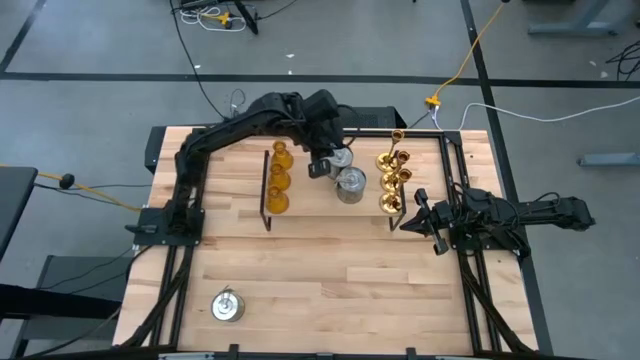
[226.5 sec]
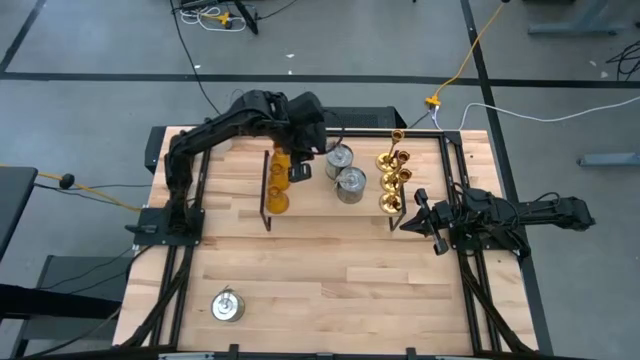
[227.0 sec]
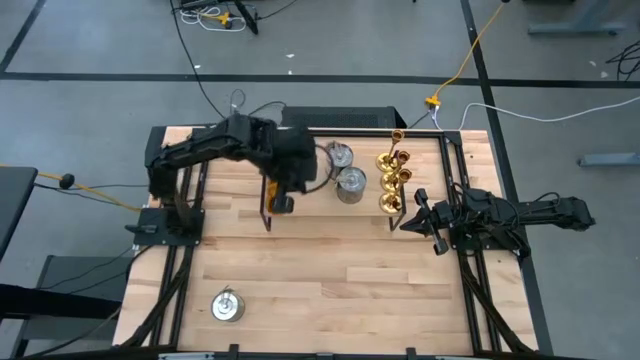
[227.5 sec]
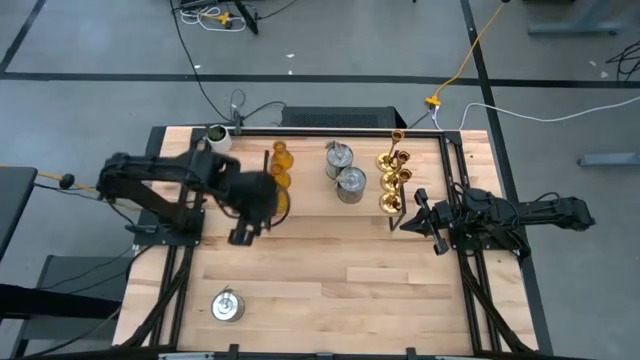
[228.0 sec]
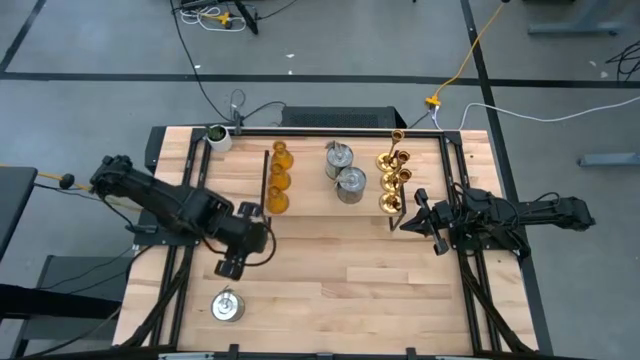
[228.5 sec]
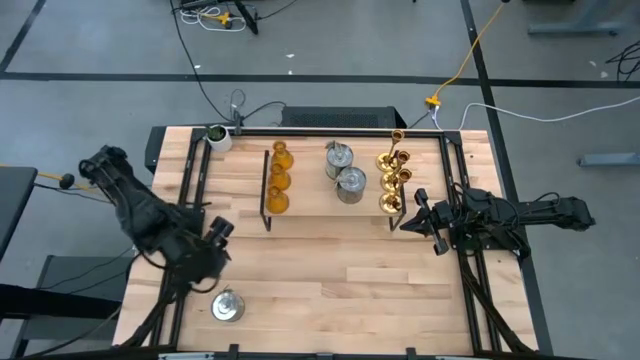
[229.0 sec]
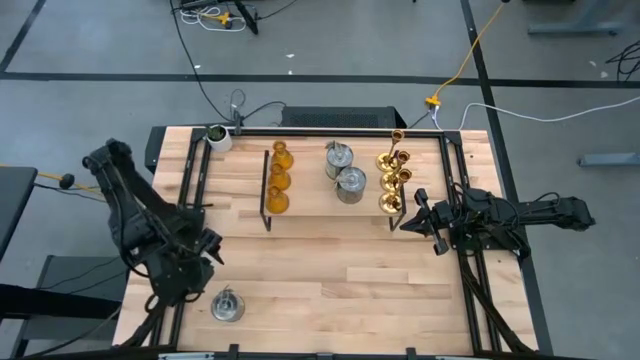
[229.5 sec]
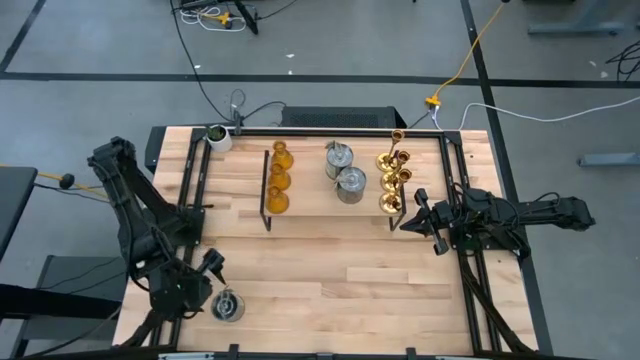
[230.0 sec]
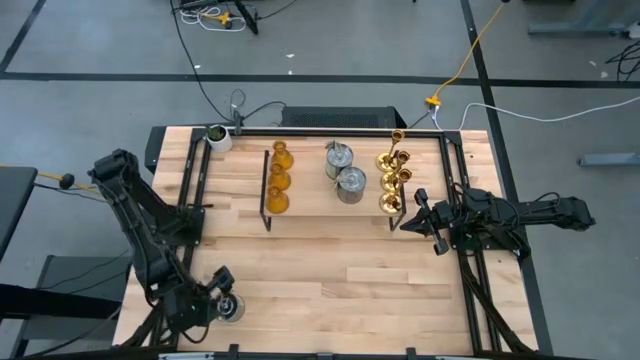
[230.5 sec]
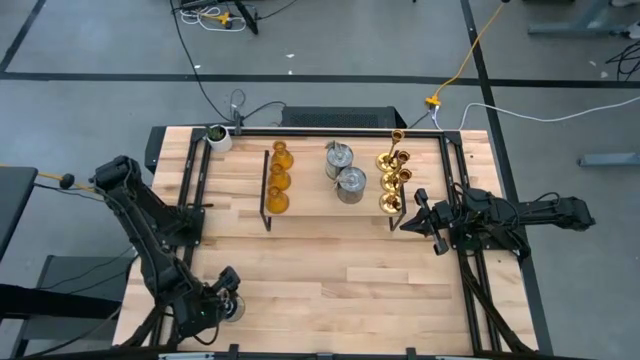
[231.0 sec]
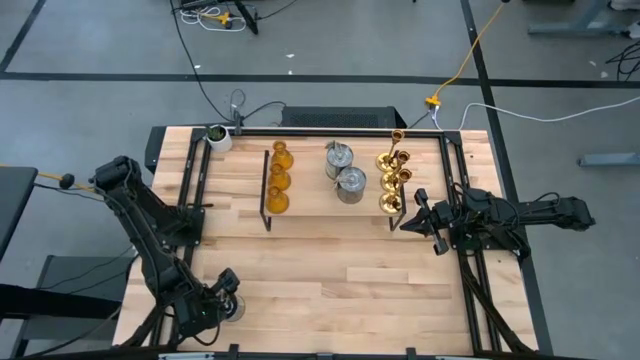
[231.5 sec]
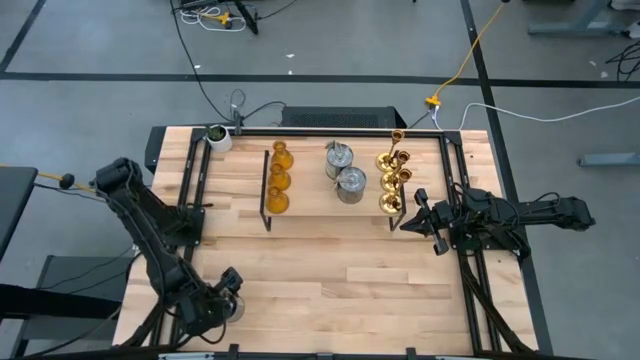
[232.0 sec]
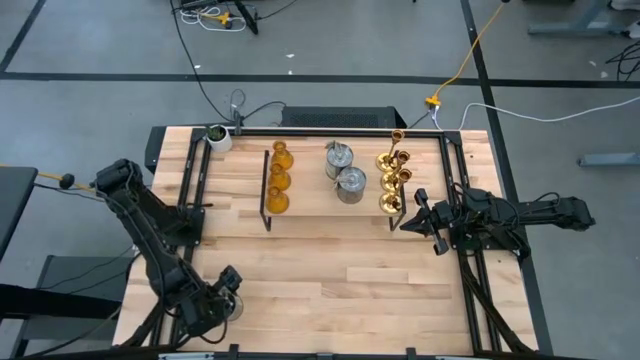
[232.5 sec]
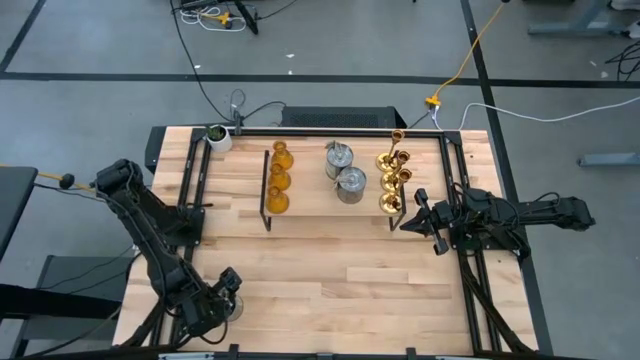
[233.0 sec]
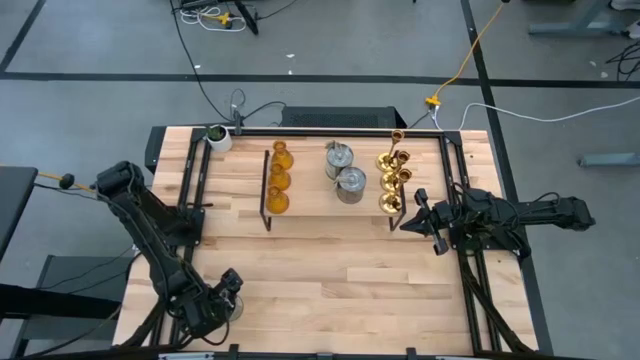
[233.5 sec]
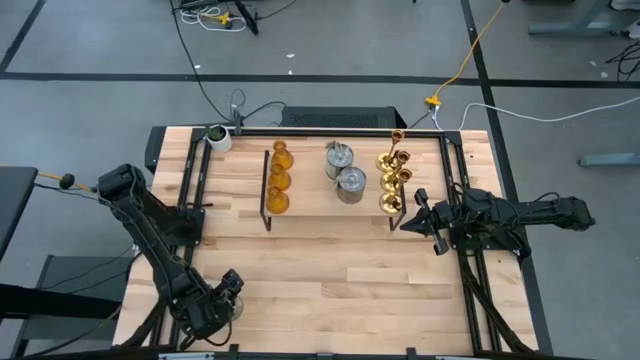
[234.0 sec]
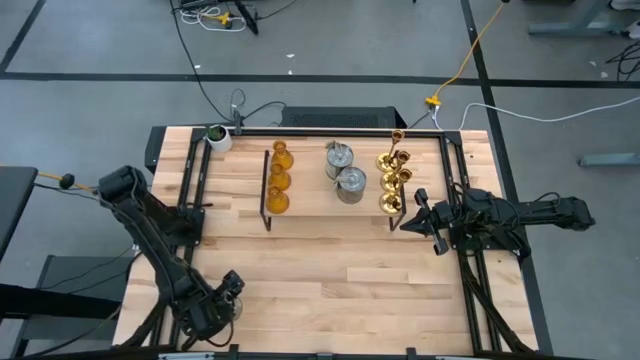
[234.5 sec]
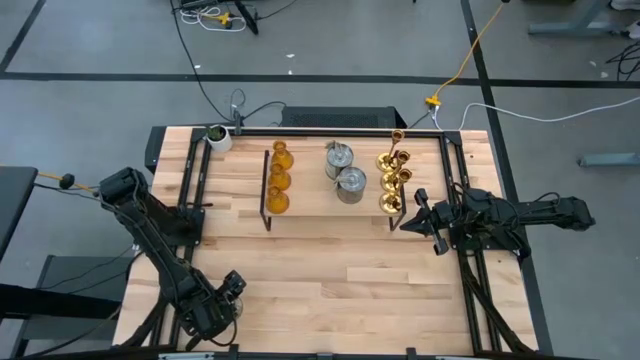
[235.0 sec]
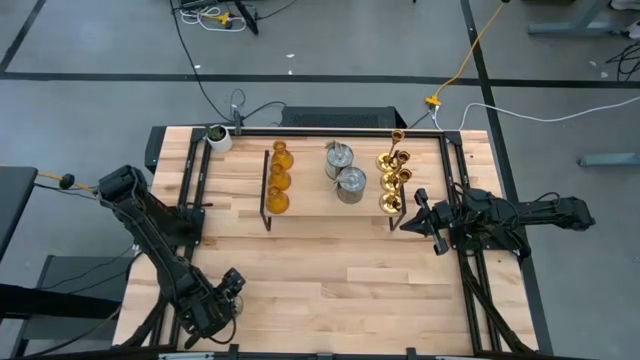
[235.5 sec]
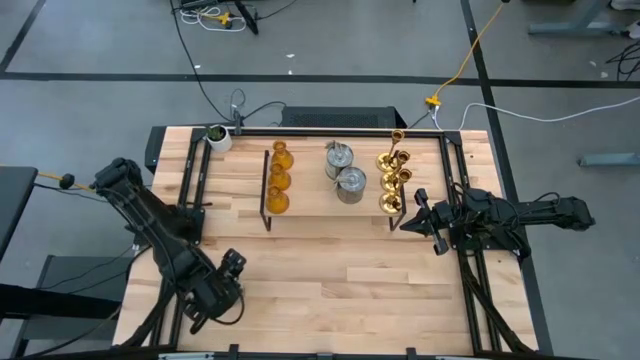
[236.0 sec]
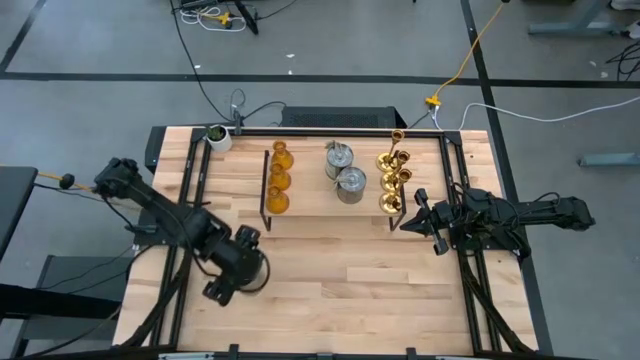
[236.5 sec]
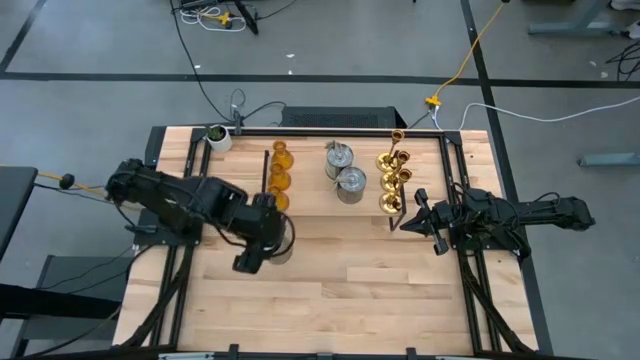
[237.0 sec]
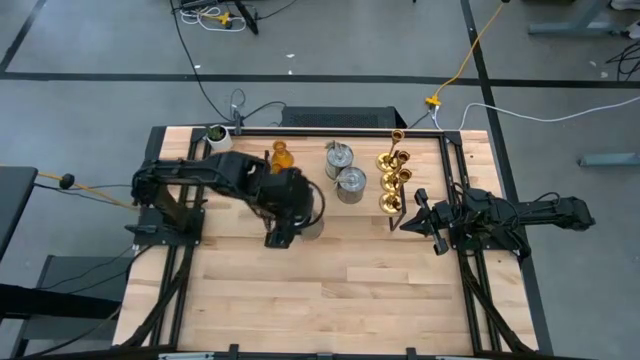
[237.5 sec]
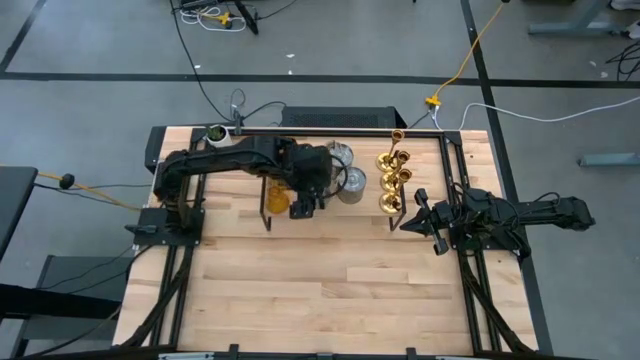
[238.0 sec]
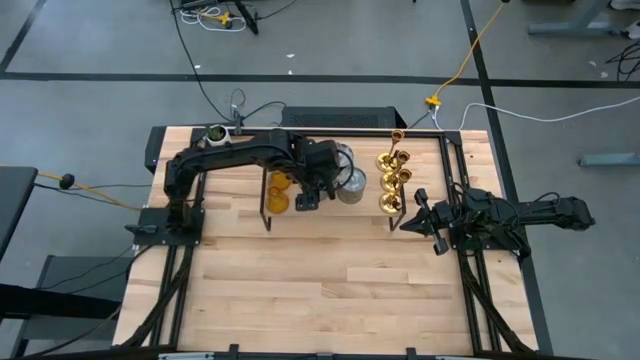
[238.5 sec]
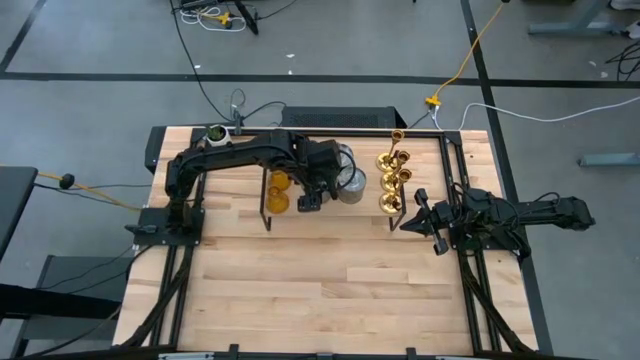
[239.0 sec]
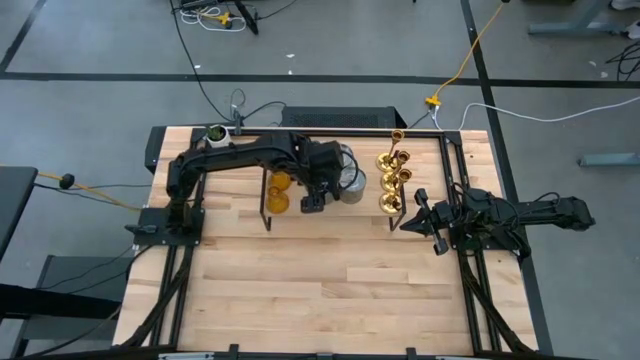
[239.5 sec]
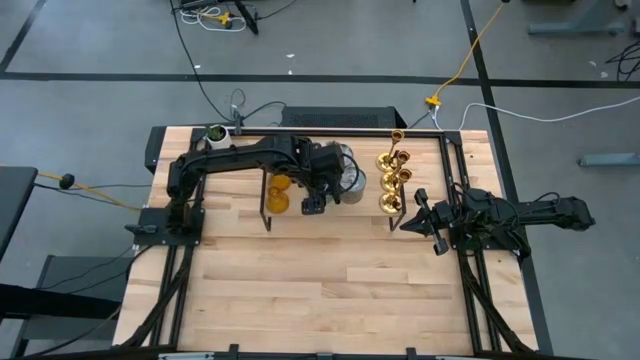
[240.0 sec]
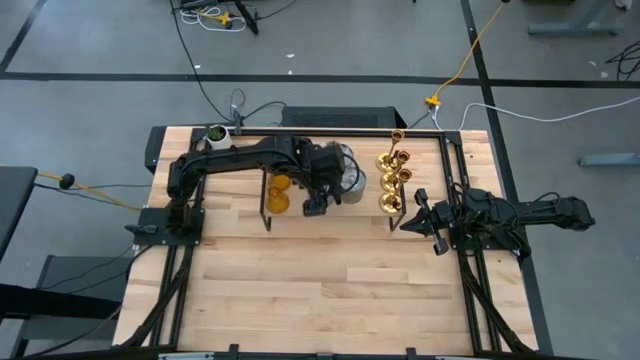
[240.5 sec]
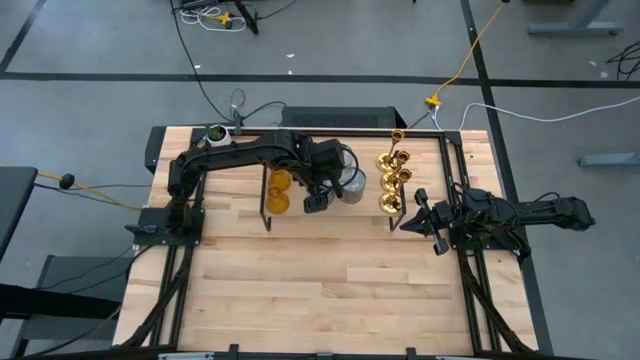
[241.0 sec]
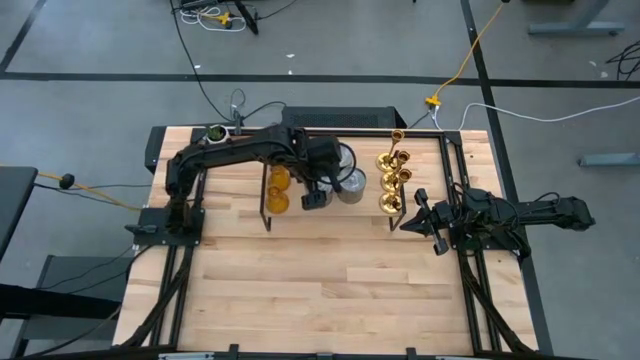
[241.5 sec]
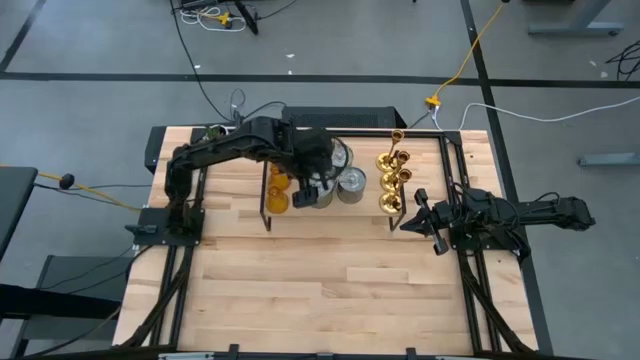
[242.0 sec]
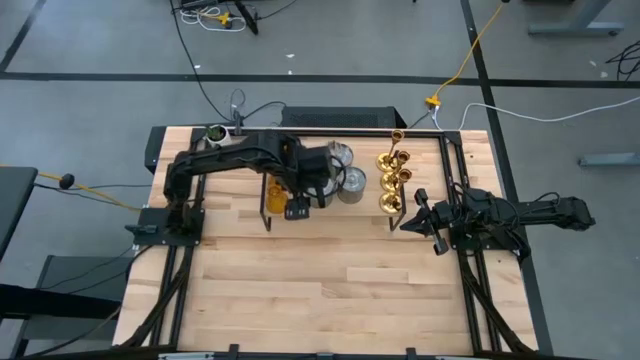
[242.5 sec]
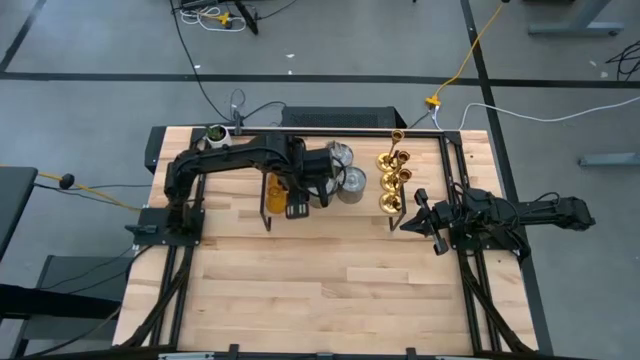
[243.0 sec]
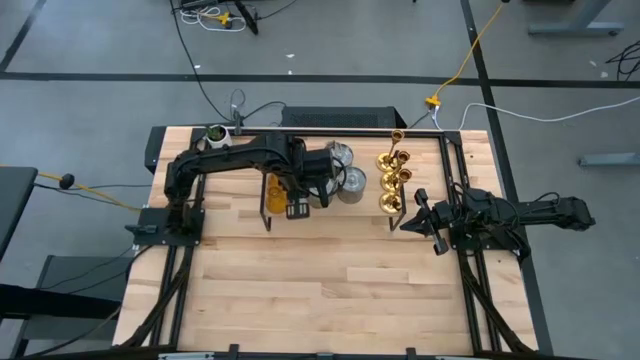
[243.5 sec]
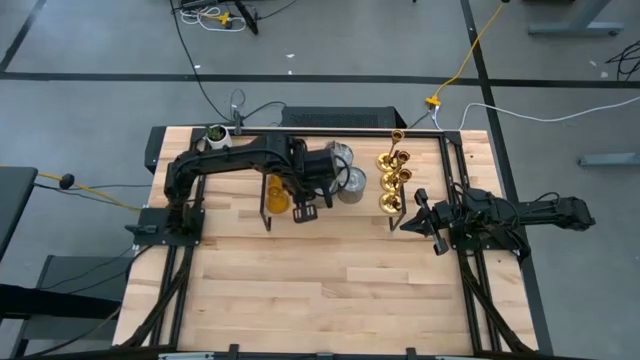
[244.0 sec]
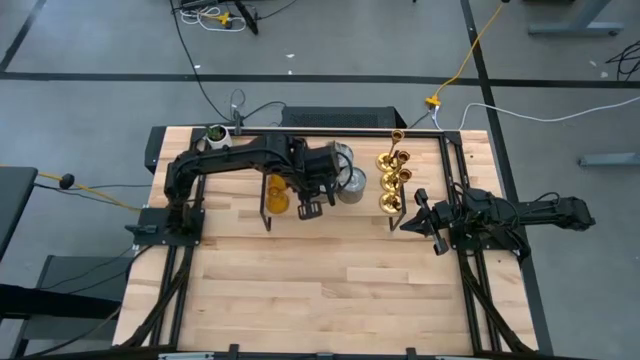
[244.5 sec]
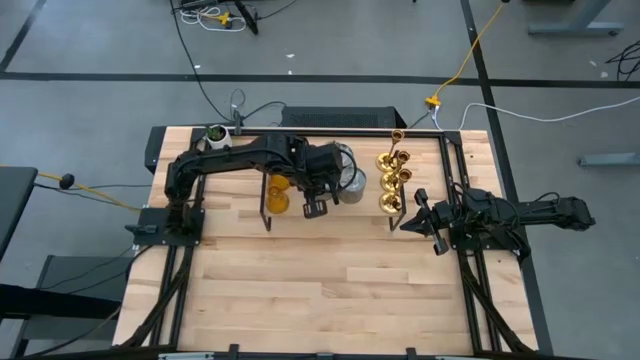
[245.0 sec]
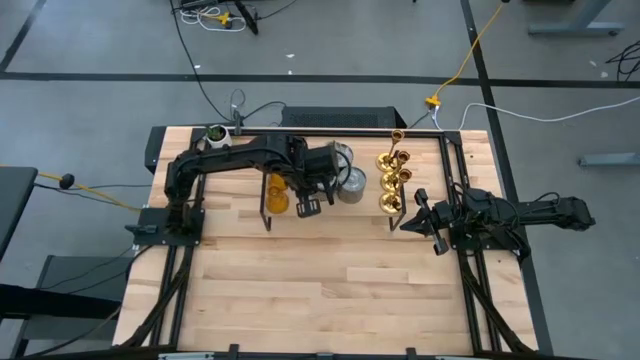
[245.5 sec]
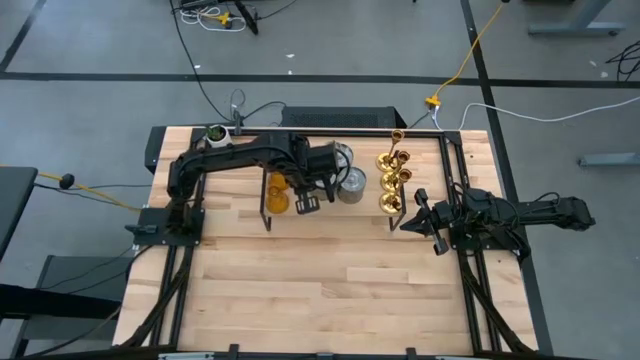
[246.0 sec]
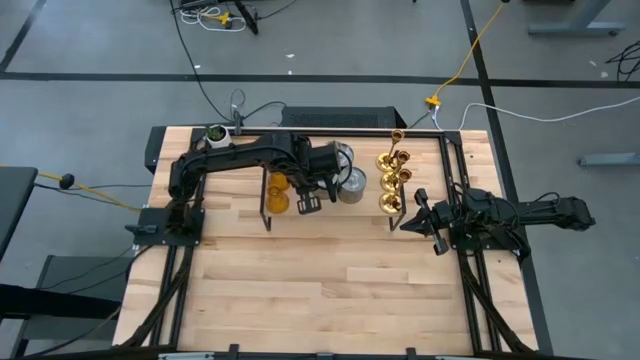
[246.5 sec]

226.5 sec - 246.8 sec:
Task: Pick & Place candle stick holders
Put the scented candle on the shelf

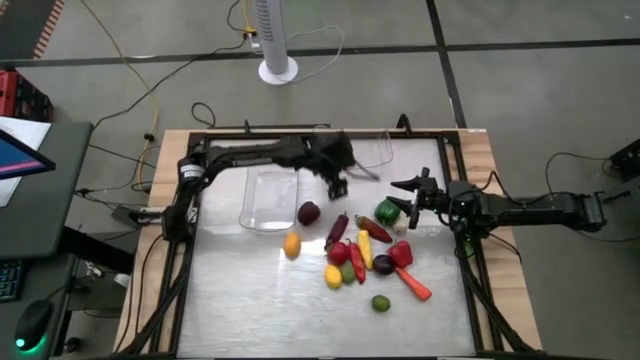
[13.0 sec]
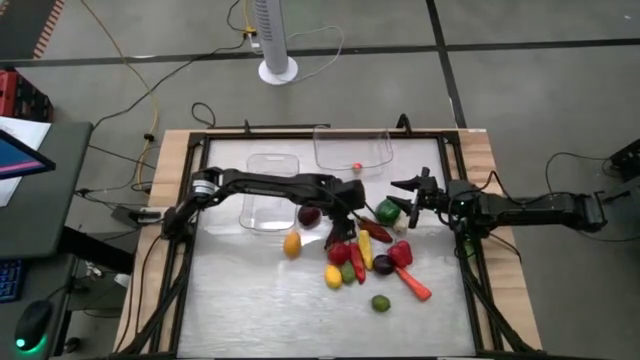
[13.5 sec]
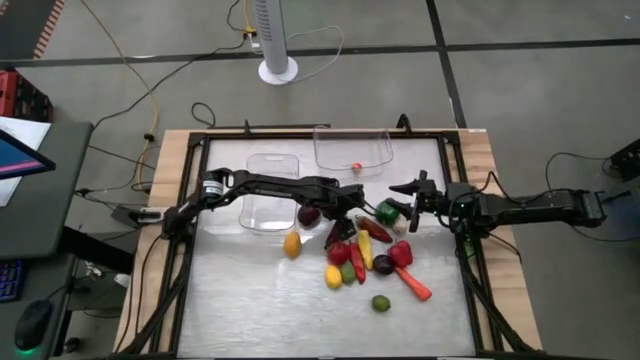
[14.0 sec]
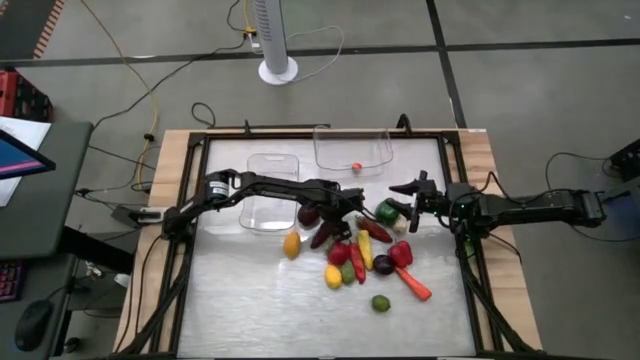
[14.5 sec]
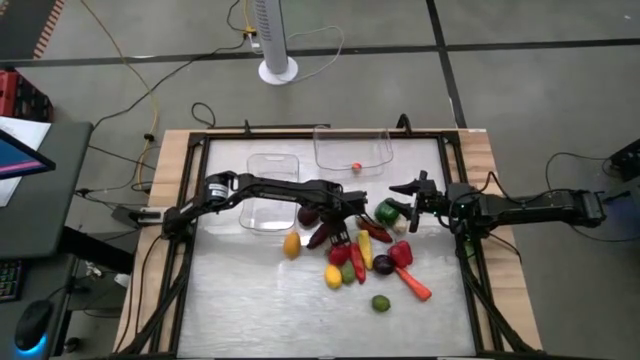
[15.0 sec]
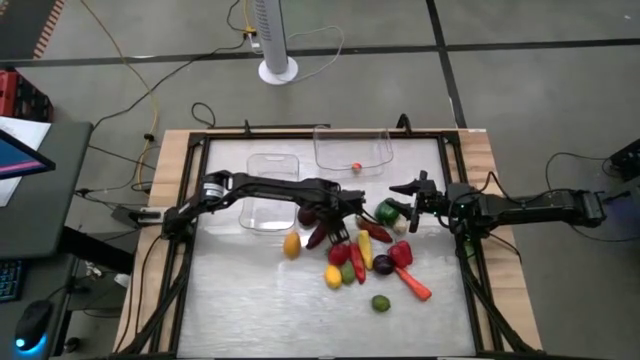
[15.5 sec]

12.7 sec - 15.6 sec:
Task: Sort produce into baskets
Put the top left red pepper into the left transparent bin
